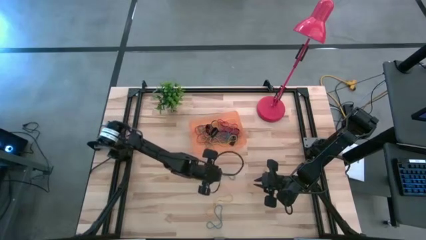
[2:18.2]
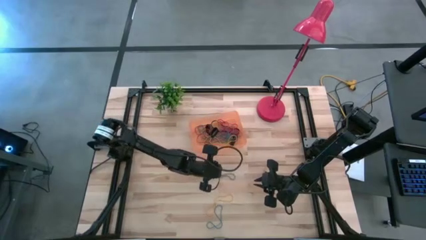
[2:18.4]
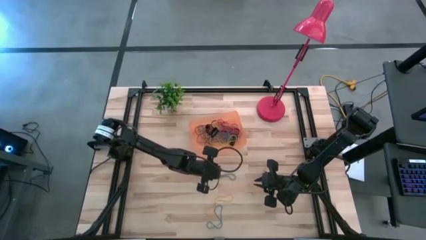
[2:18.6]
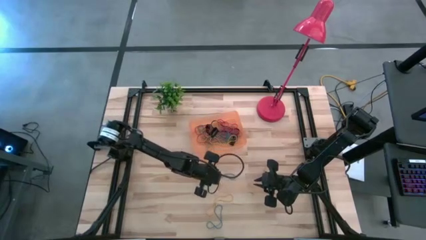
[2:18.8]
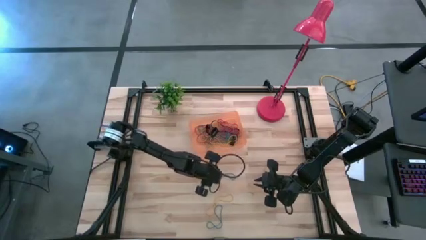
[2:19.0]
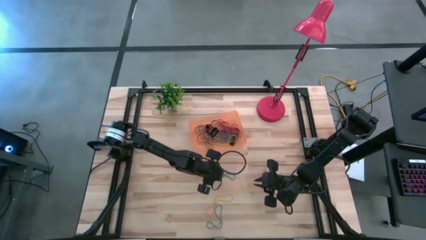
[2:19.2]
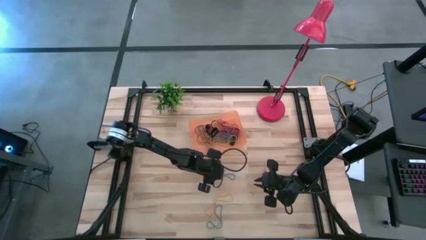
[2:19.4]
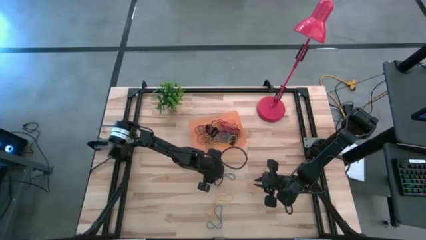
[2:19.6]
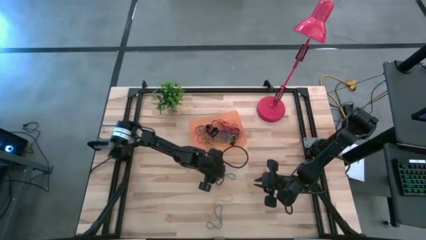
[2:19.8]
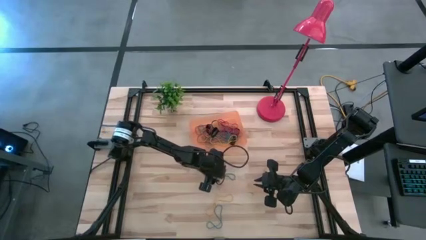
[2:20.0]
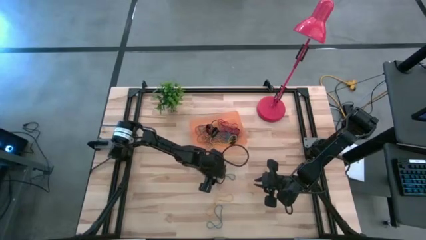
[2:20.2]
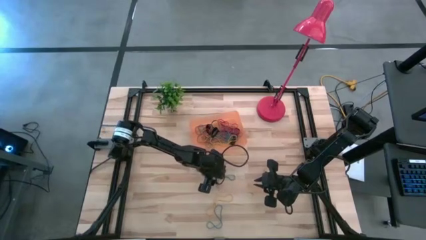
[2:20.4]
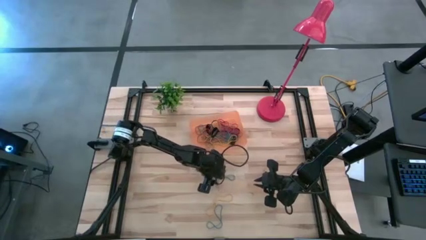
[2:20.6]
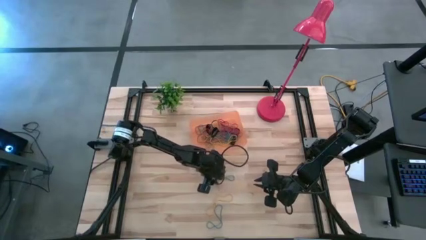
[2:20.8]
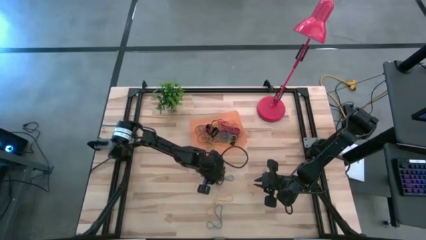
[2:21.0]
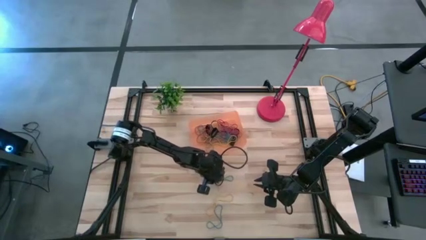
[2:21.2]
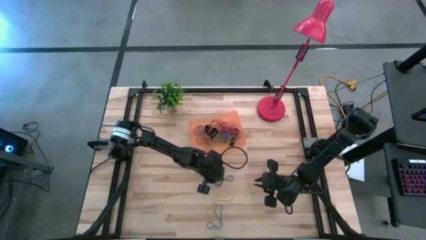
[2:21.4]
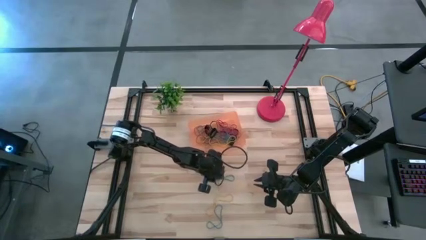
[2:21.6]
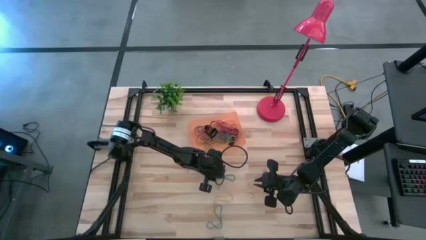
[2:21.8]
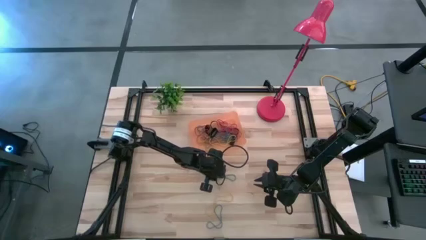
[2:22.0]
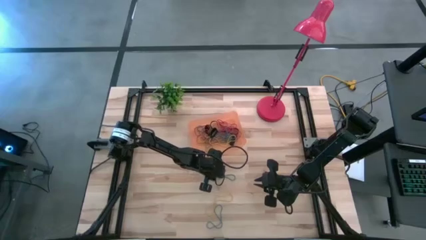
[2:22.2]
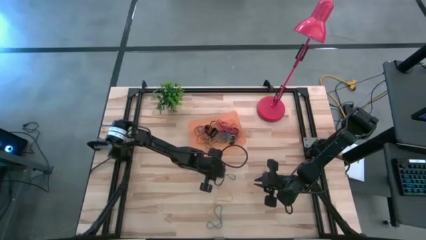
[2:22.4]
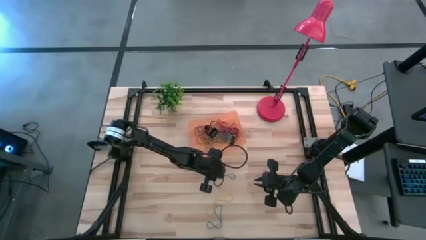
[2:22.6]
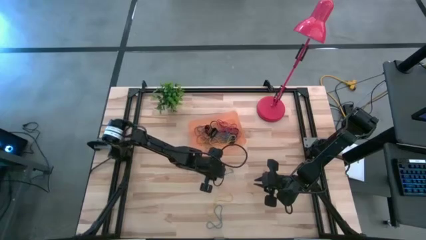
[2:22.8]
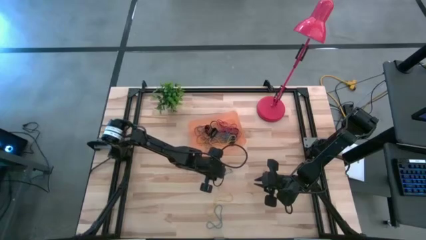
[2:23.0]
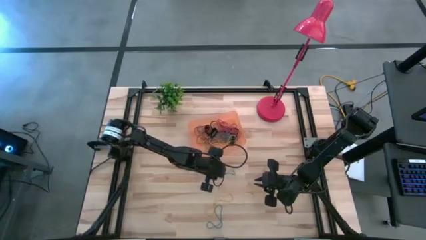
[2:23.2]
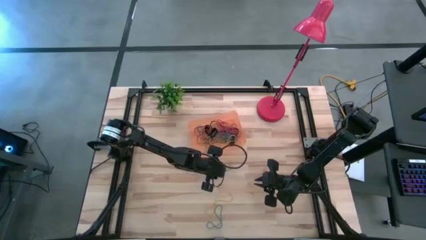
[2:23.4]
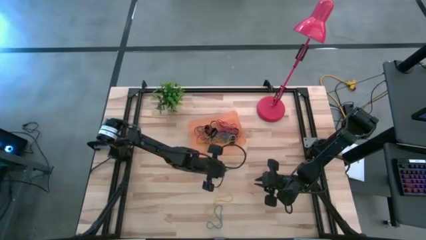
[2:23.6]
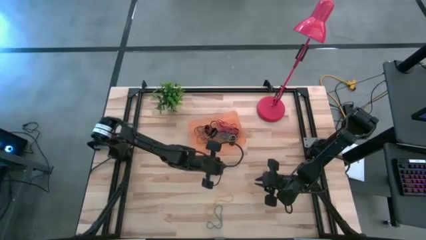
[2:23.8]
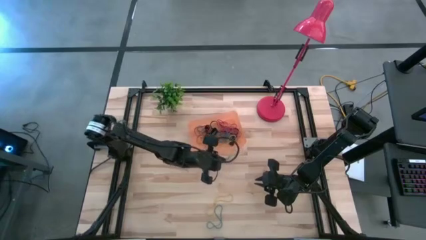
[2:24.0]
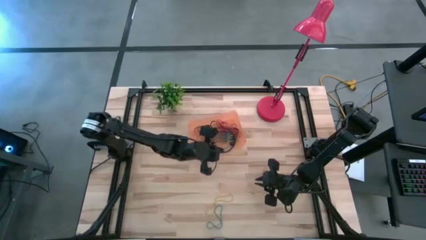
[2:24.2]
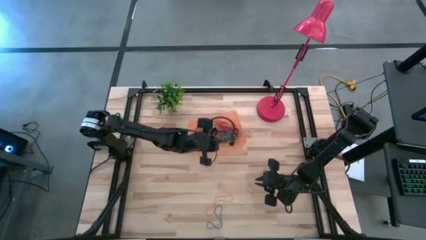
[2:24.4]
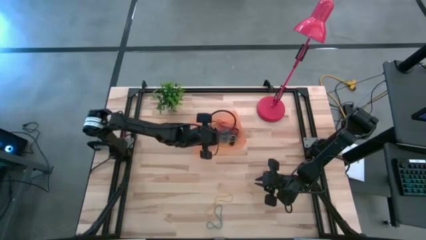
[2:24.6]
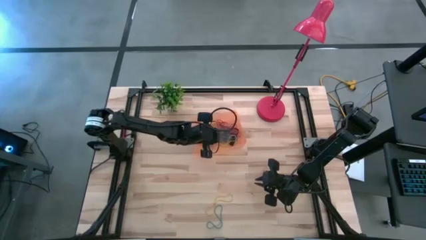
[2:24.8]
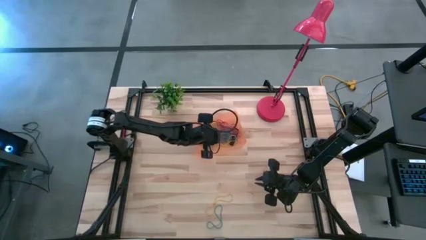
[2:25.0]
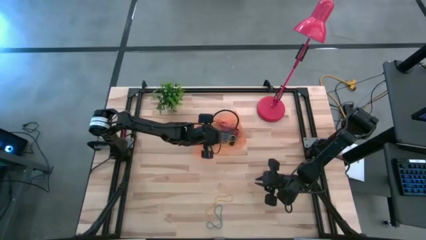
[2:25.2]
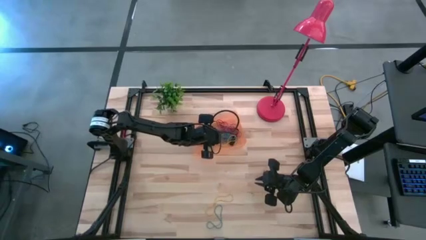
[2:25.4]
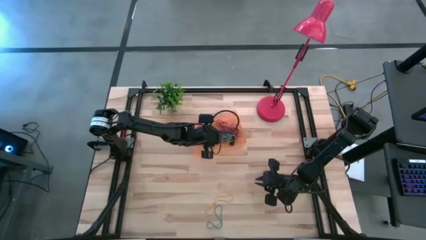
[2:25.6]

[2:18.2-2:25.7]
Task: Pick and place rubber bands into bin
Put the blue rubber band into the orange bin

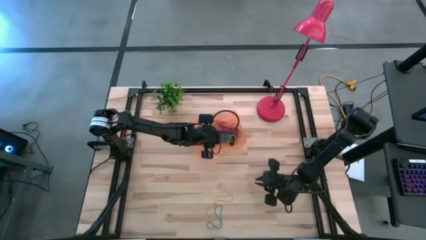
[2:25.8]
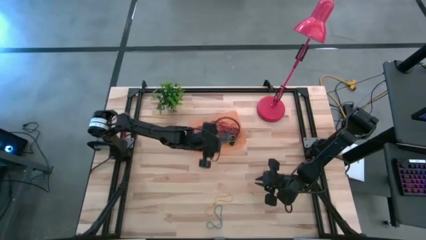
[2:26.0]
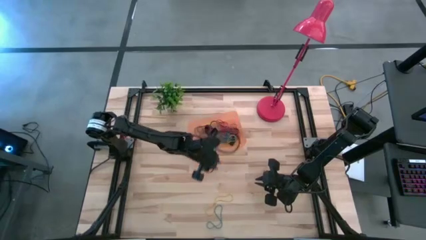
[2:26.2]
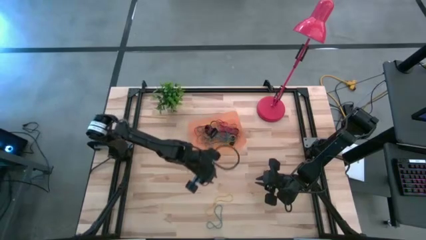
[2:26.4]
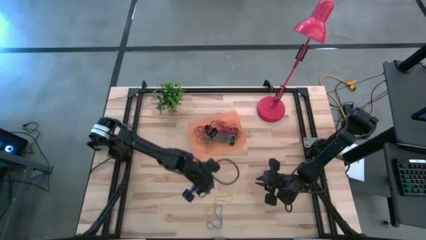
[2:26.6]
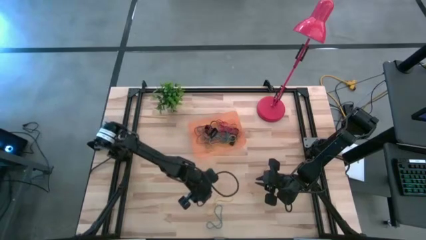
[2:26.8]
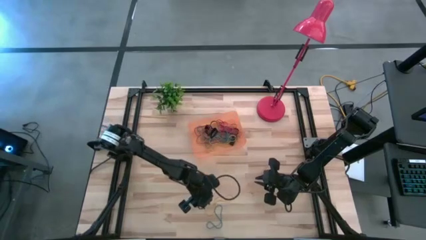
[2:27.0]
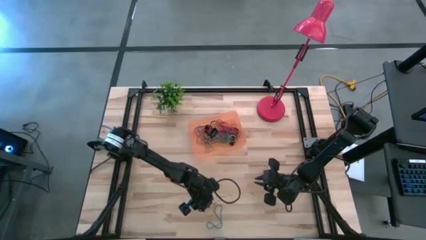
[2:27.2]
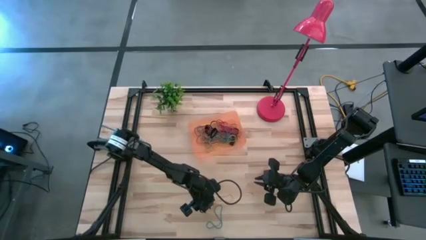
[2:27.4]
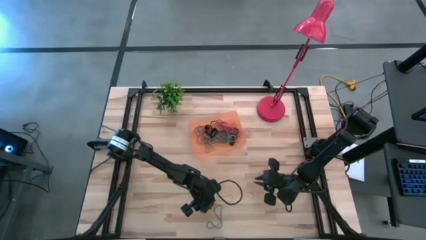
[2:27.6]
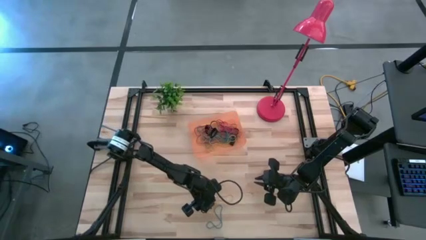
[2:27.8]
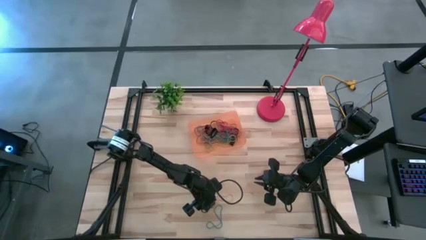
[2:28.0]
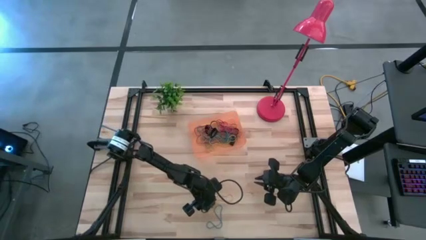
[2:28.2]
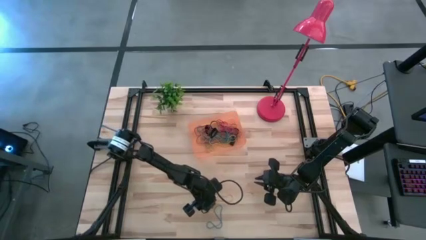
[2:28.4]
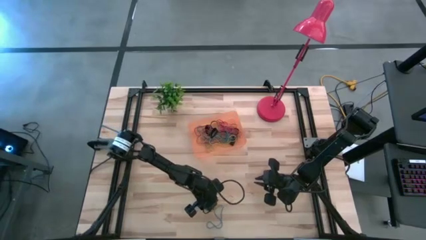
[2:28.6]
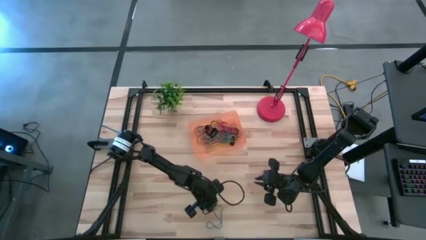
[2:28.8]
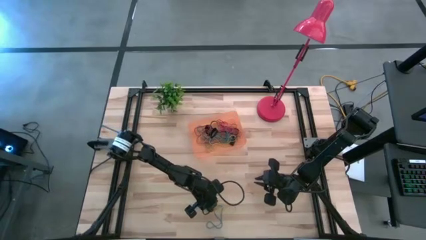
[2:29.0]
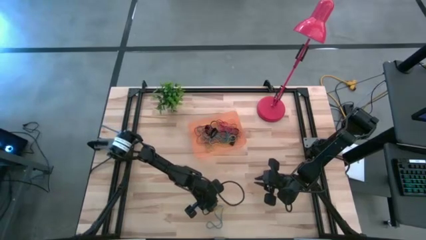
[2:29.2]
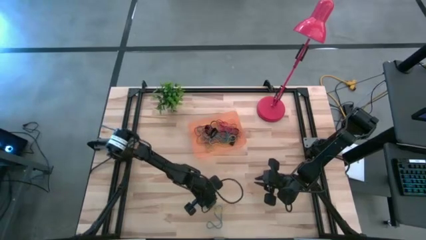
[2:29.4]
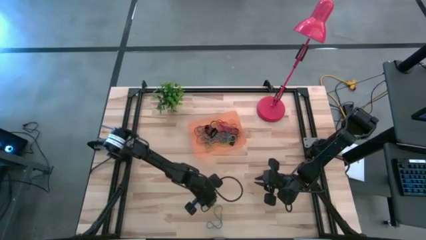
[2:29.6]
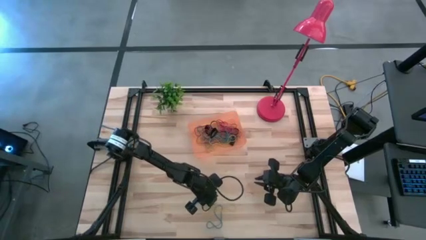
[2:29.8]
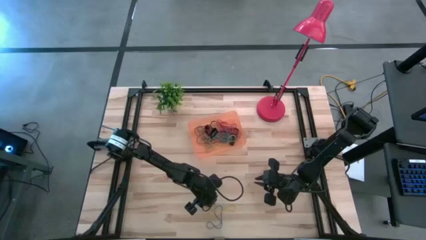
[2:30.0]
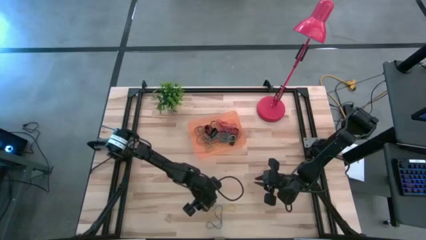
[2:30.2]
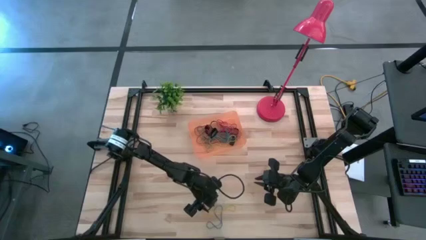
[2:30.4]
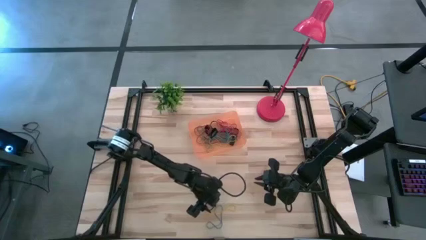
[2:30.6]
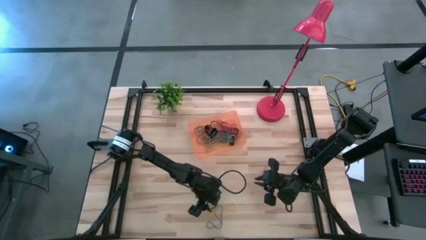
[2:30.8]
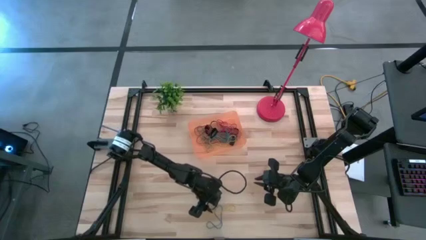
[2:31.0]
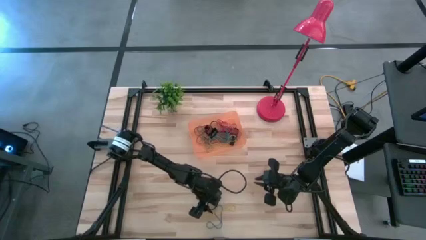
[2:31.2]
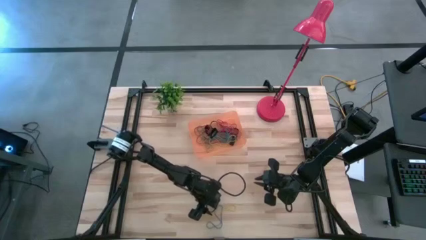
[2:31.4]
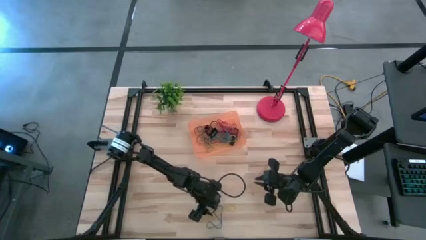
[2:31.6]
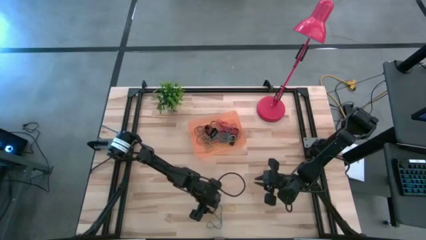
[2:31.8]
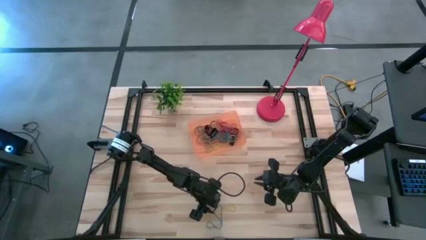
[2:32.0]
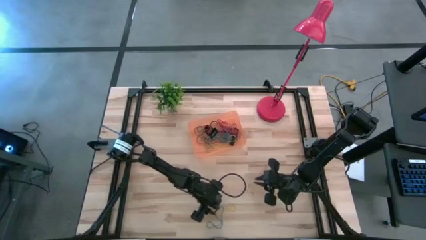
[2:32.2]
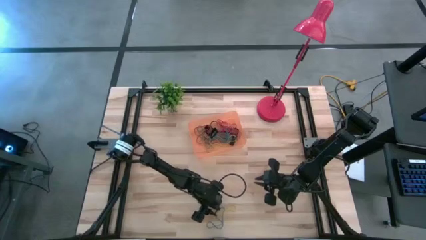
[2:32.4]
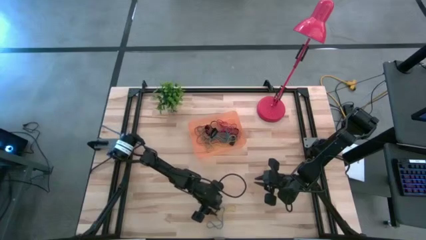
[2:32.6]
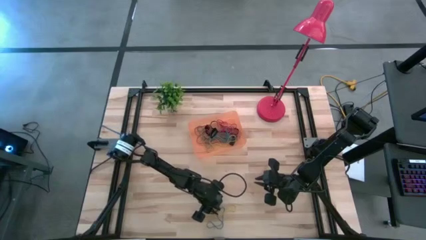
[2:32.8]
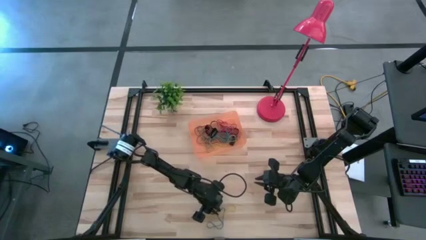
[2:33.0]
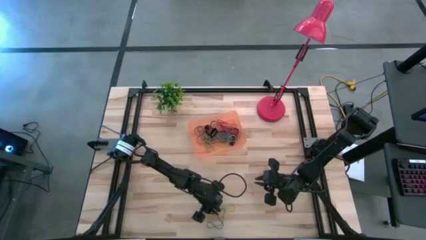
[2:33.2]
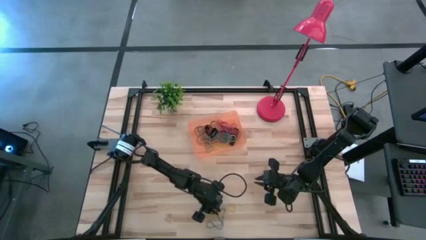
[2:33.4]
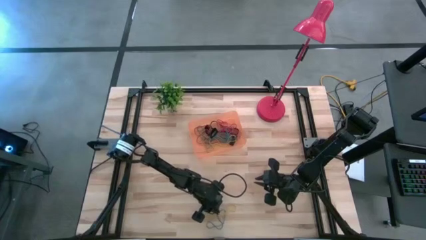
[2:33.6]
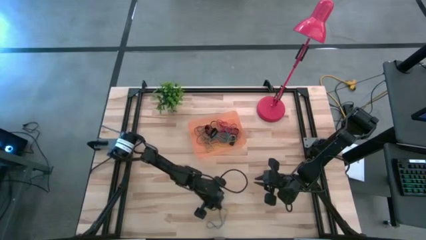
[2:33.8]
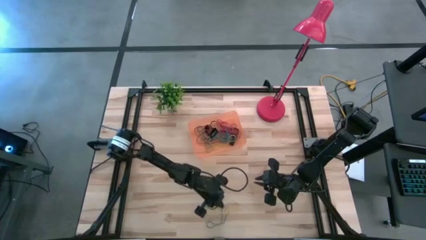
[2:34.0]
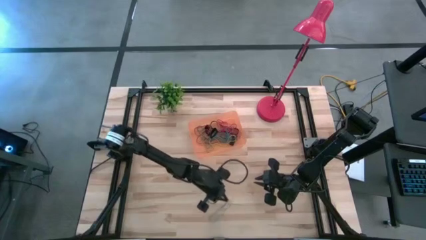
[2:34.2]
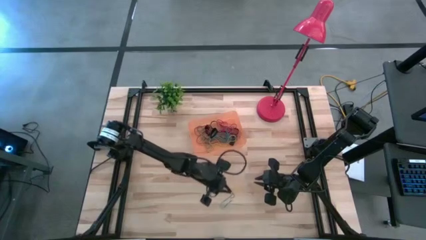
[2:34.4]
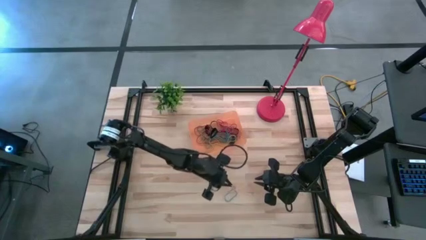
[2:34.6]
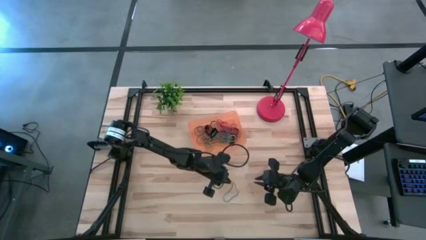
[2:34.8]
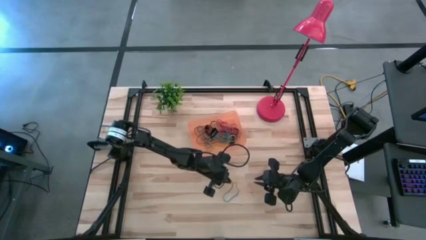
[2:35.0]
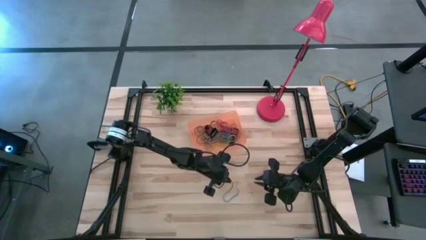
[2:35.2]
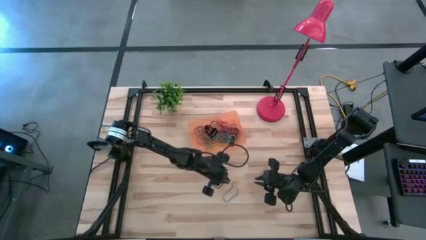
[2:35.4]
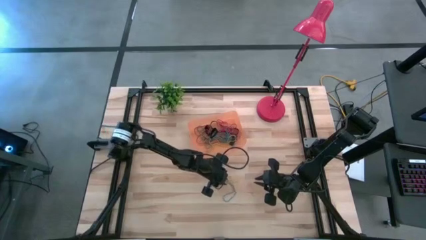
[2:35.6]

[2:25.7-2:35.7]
Put the yellow rubber band into the orange bin
